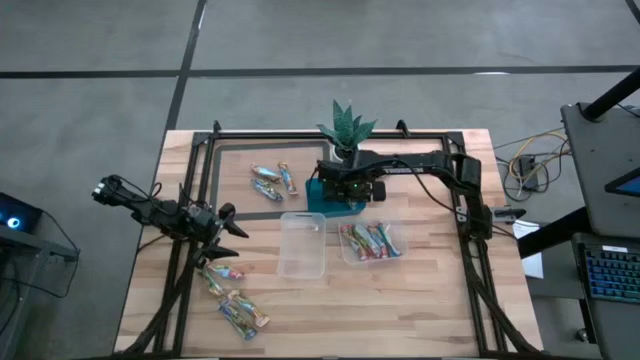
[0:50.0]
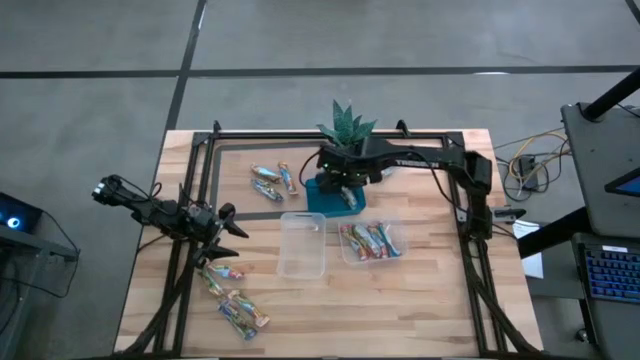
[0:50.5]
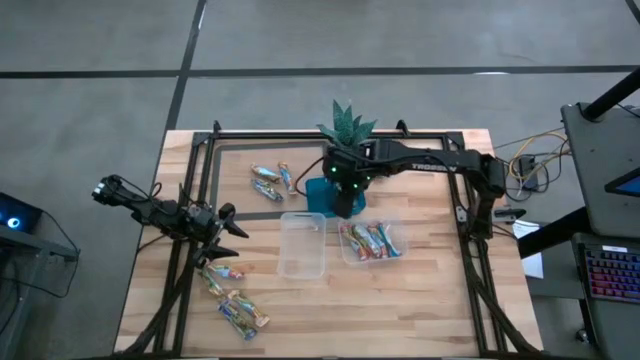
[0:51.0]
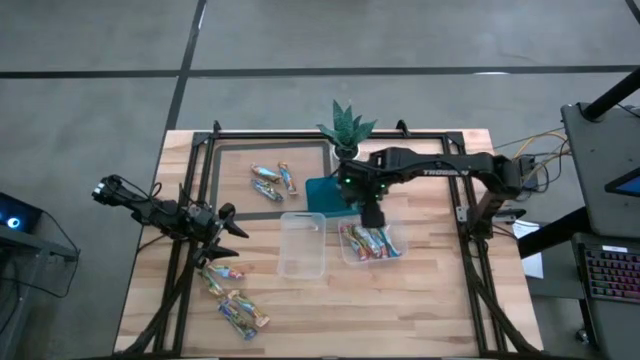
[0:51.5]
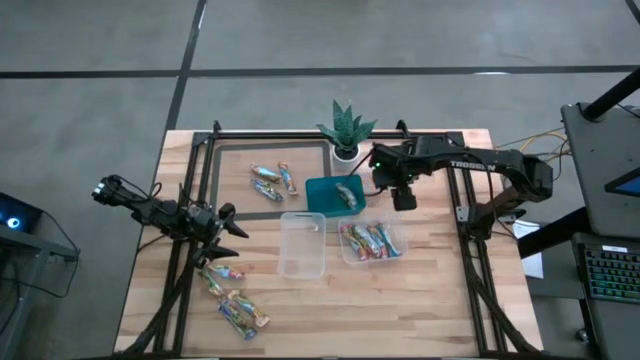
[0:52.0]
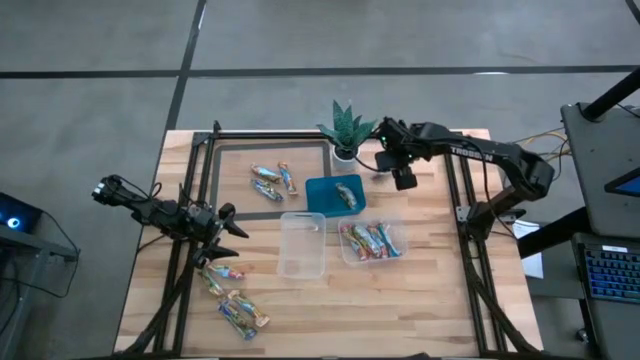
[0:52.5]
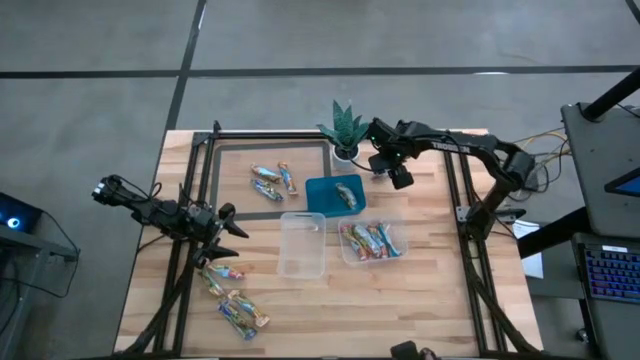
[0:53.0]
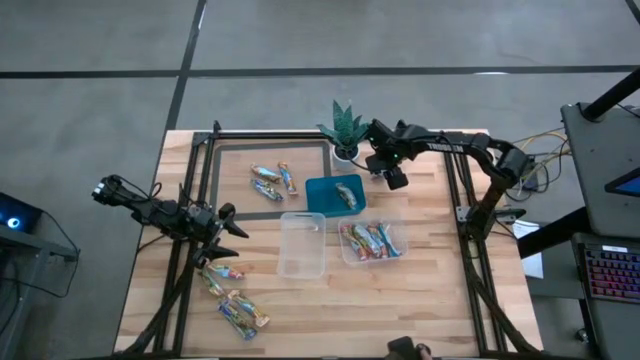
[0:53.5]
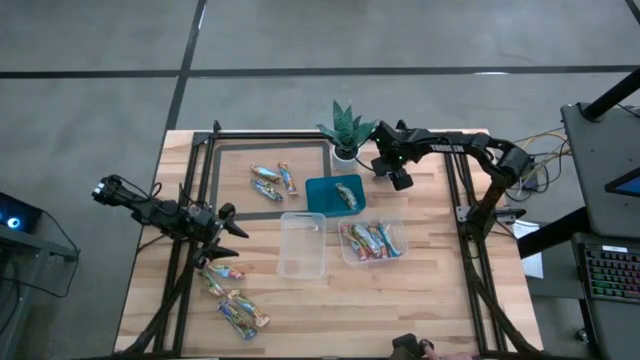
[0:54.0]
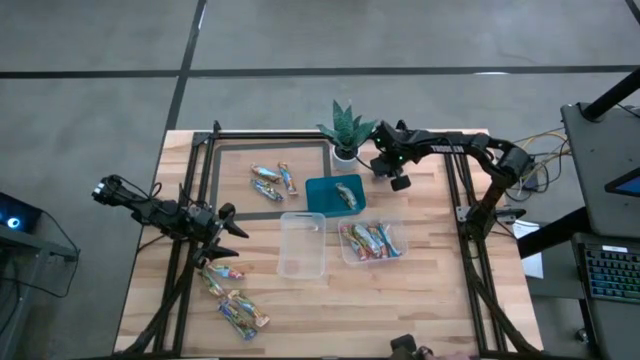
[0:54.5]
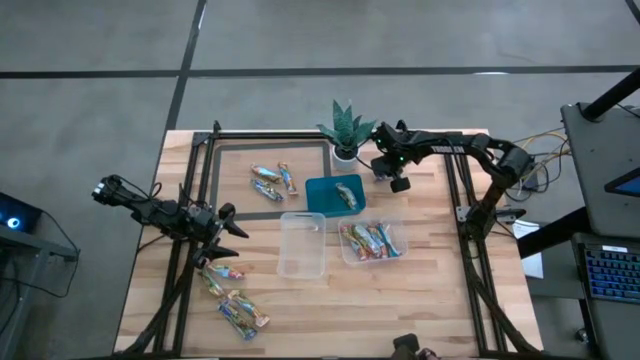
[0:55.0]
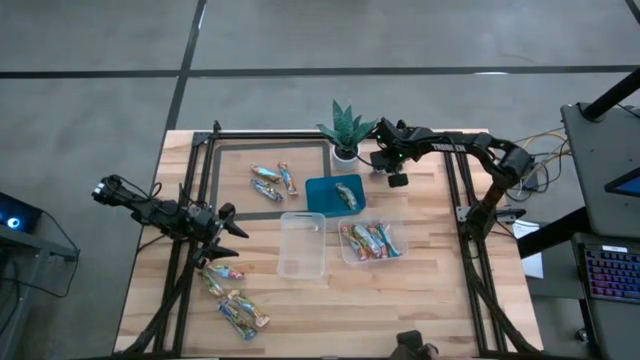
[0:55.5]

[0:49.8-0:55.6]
Task: Pick and place Granola Bars by type
Put the blue granola bar into the left transparent bin

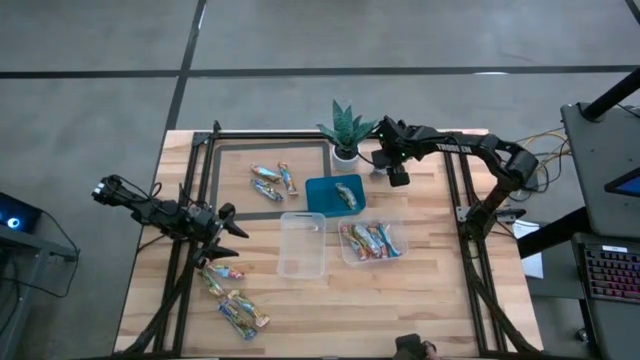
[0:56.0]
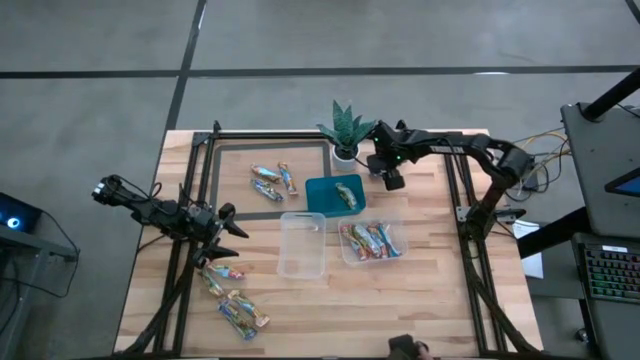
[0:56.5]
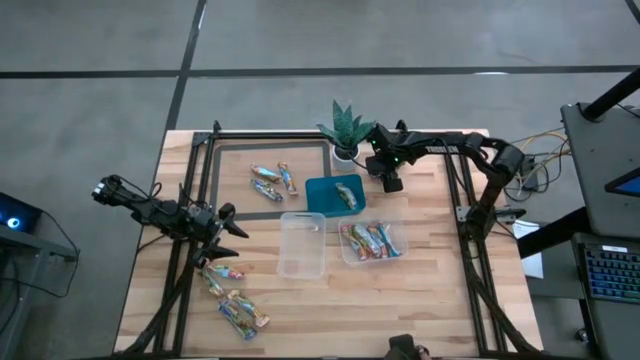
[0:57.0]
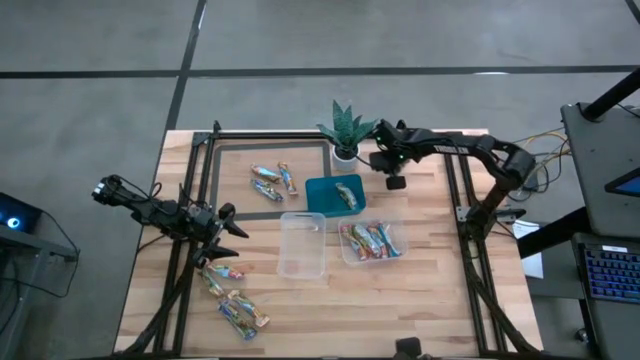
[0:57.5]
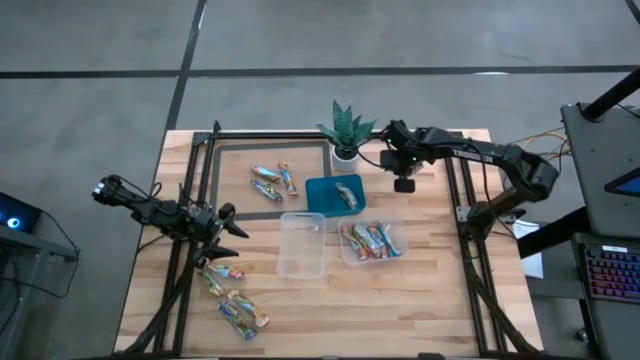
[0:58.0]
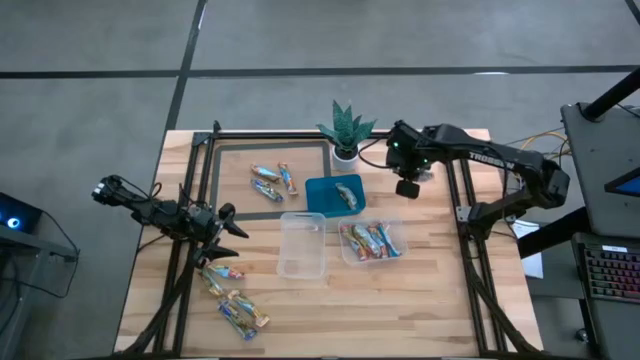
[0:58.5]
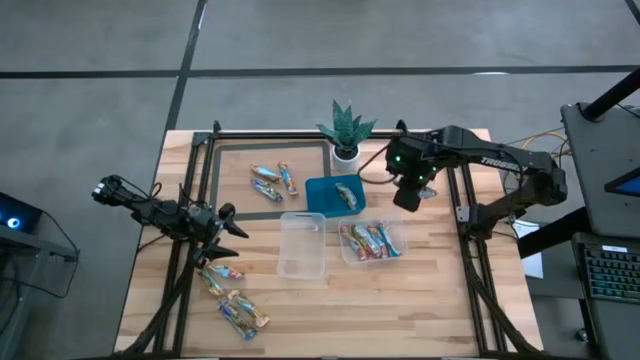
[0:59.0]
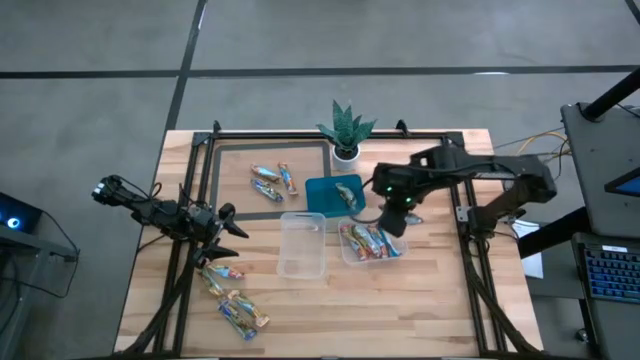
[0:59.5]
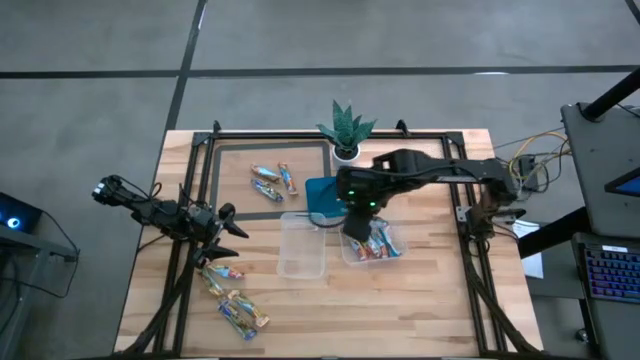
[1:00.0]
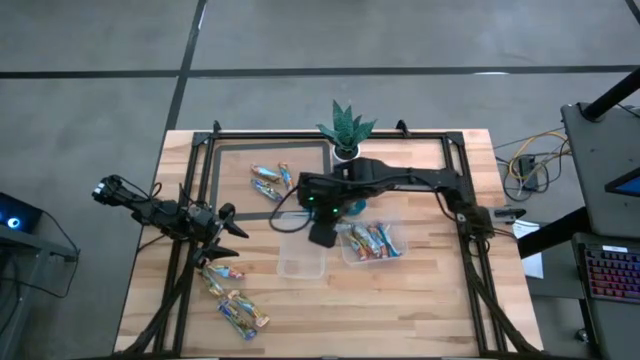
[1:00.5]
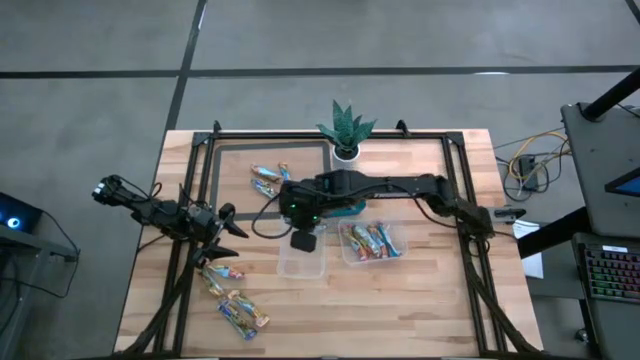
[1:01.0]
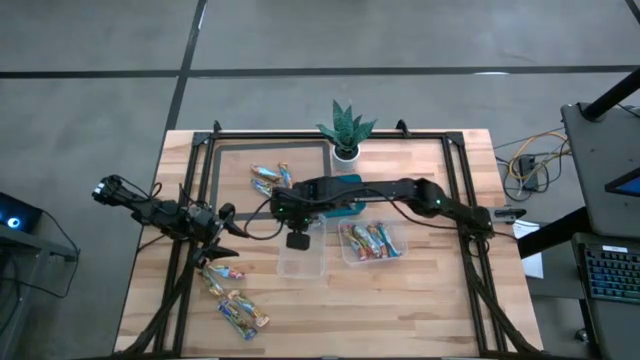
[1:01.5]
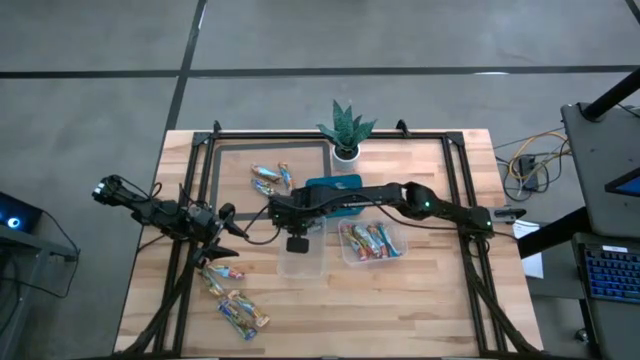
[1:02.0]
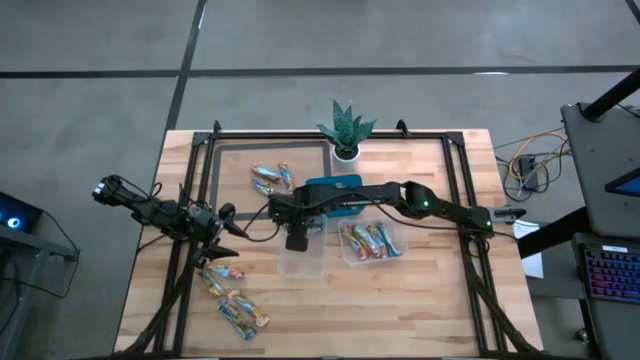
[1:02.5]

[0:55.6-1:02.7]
Put the blue granola bar into the left transparent bin

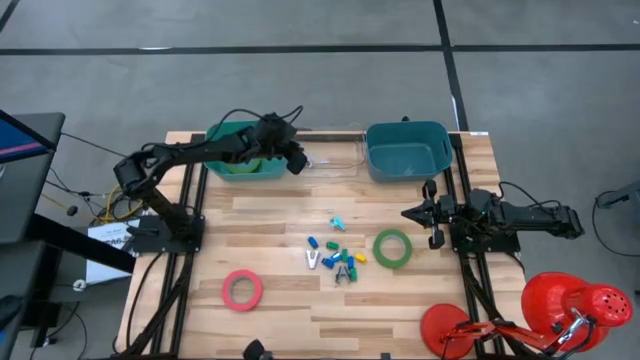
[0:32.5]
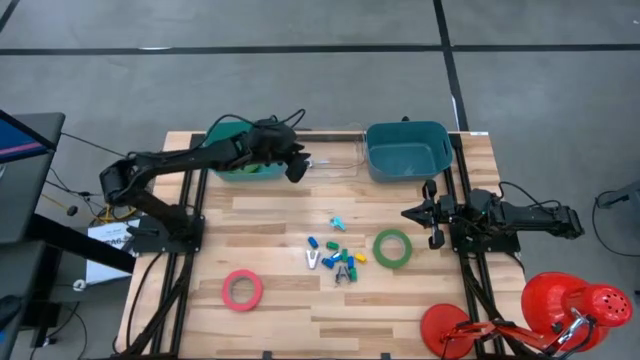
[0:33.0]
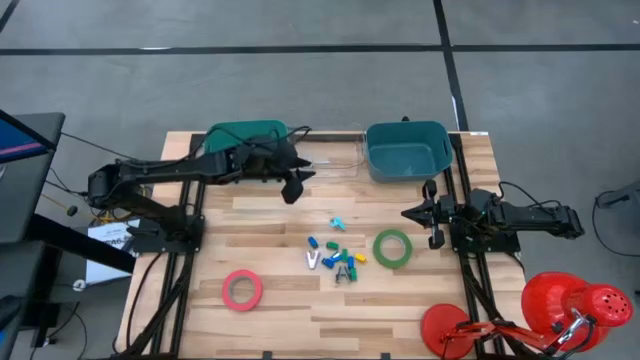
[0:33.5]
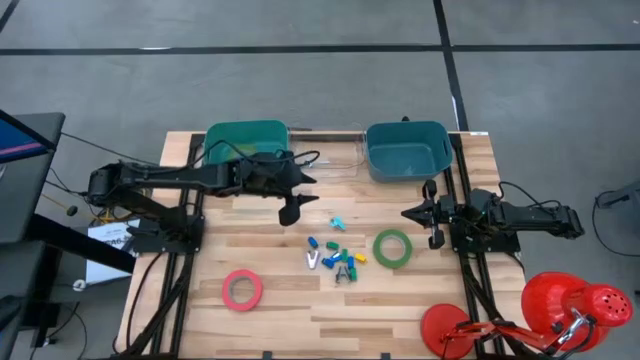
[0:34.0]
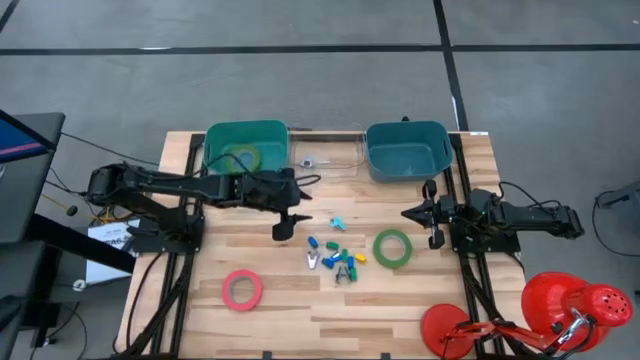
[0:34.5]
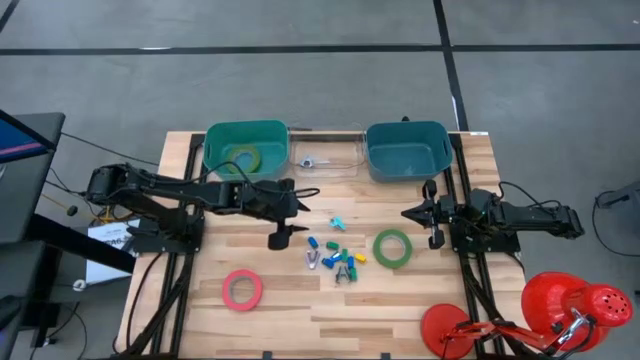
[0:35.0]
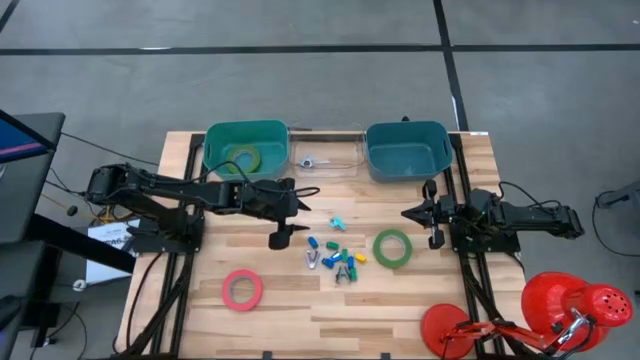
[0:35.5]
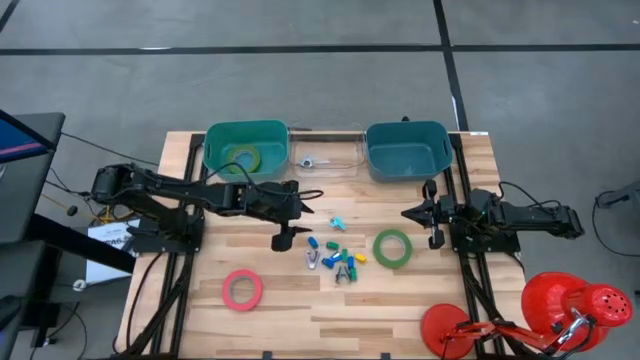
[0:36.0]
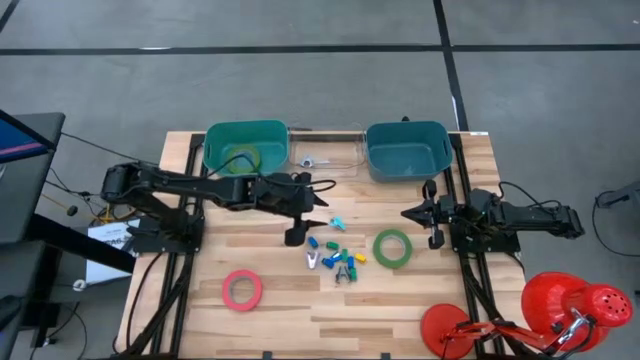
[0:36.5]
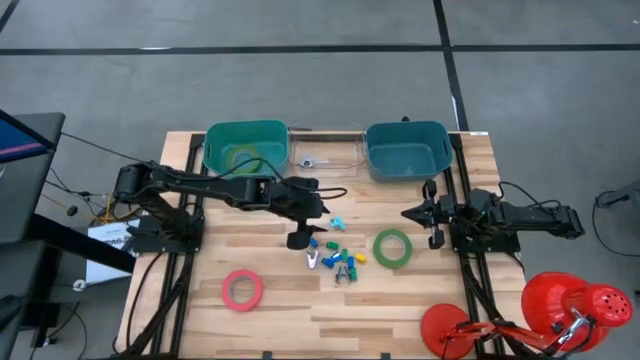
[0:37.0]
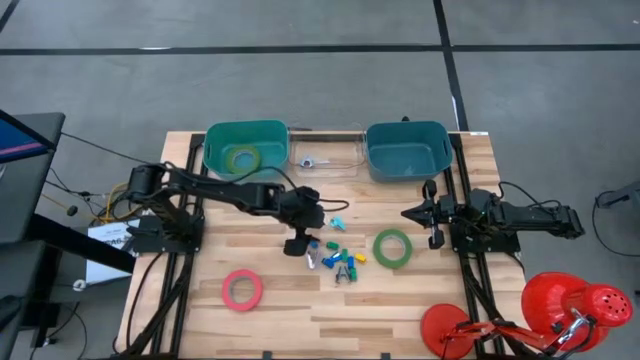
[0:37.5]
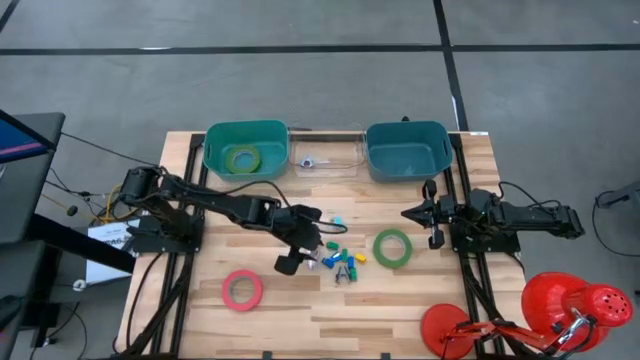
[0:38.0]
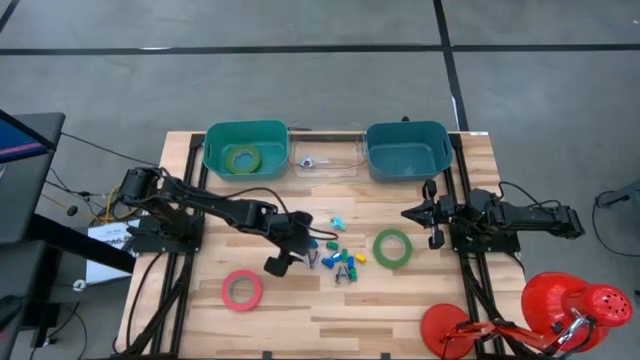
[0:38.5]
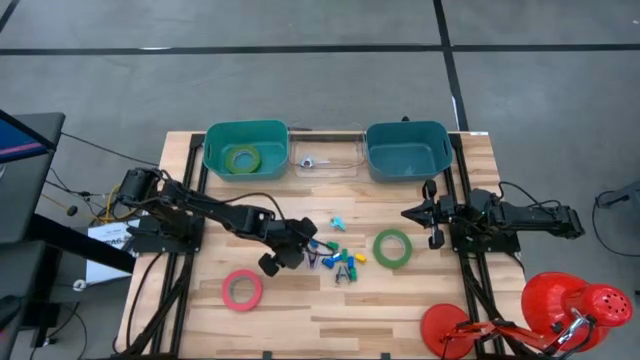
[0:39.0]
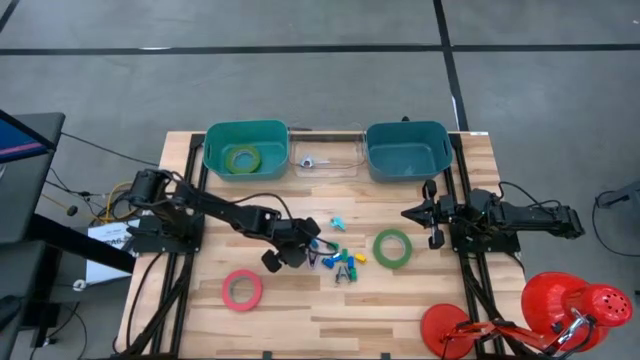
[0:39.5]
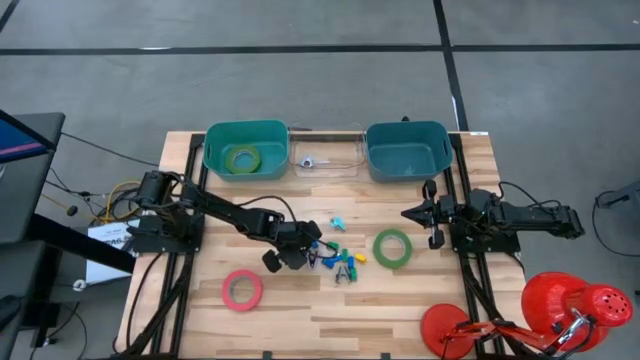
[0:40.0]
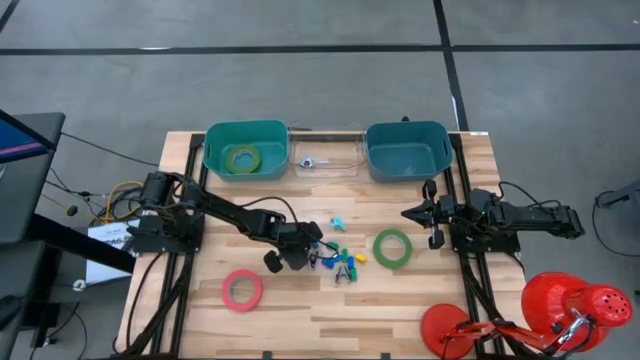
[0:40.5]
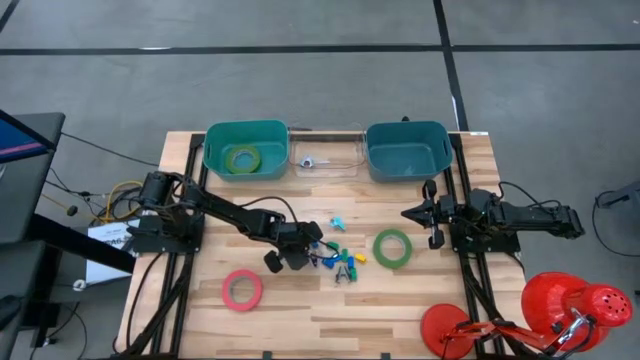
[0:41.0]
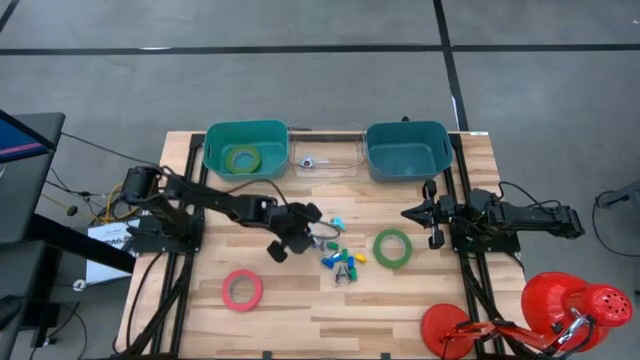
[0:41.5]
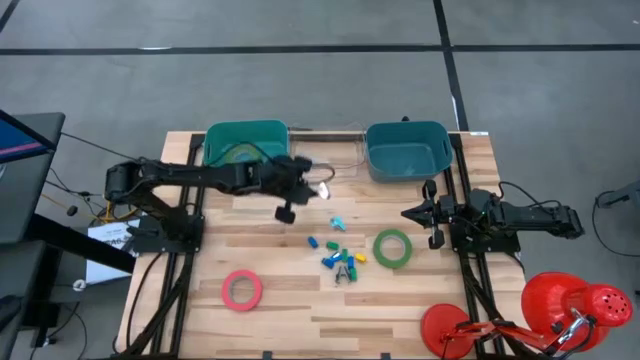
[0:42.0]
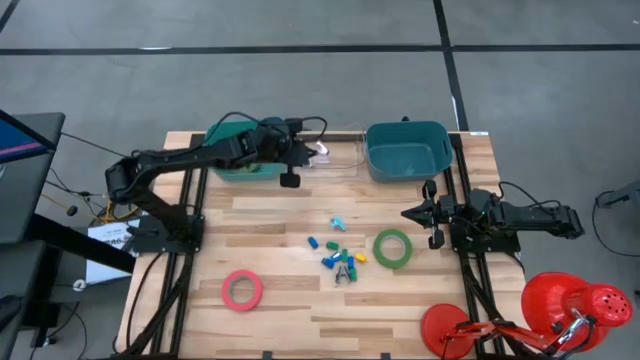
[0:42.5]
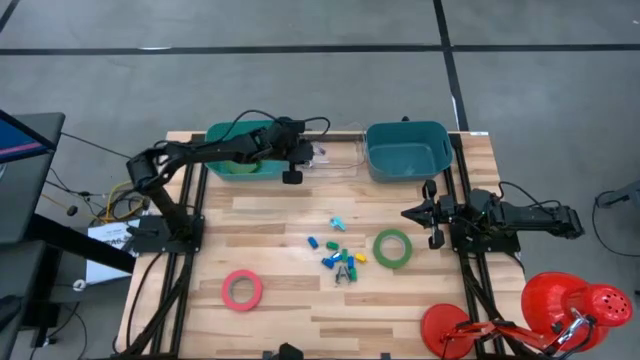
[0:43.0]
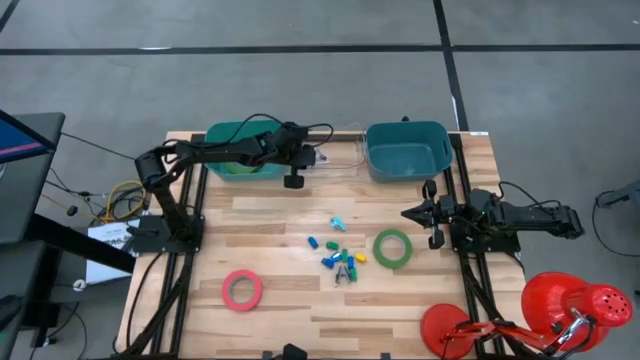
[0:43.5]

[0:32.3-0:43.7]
Task: Pick and place Stapler, Stapler remover, tape
Put the purple stapler into the transparent bin
